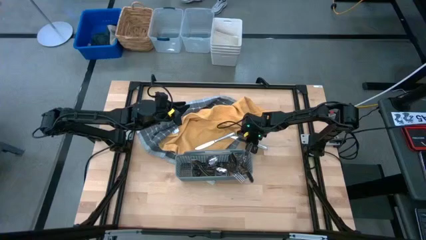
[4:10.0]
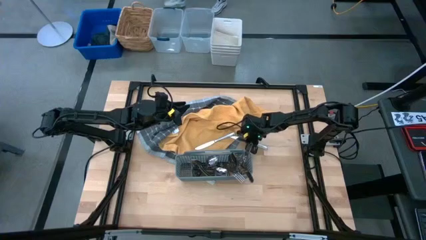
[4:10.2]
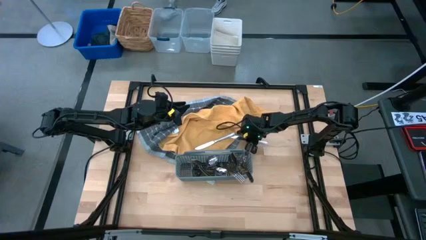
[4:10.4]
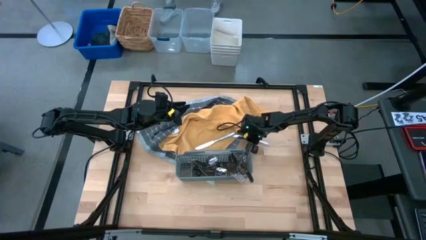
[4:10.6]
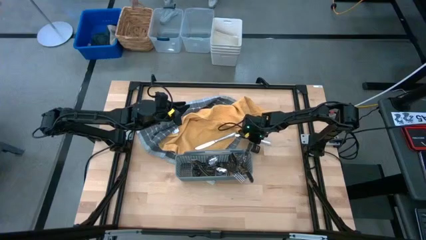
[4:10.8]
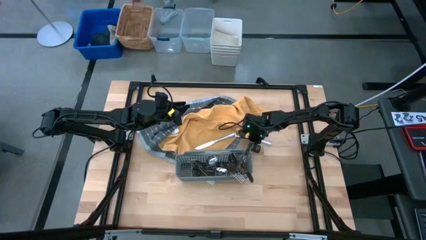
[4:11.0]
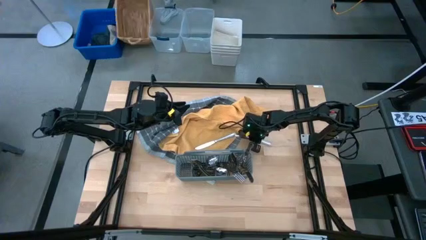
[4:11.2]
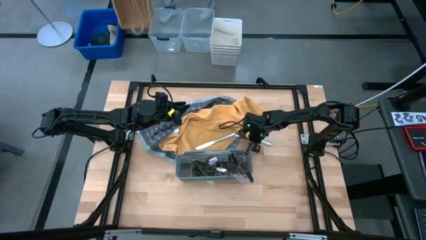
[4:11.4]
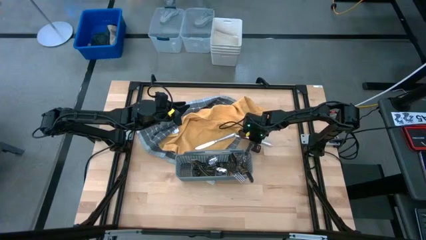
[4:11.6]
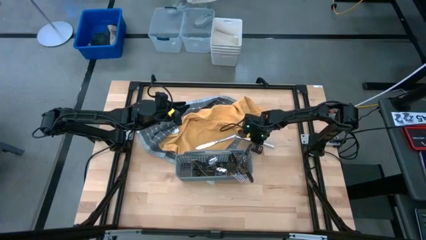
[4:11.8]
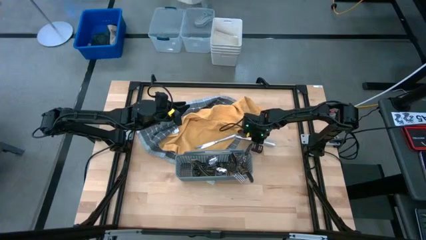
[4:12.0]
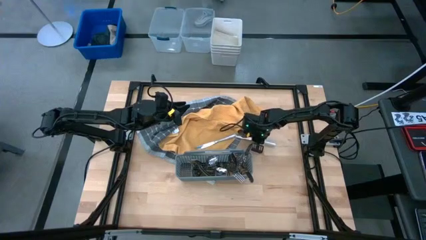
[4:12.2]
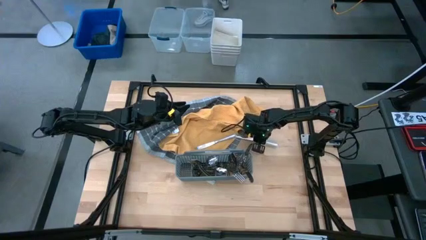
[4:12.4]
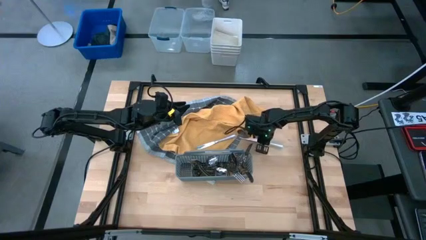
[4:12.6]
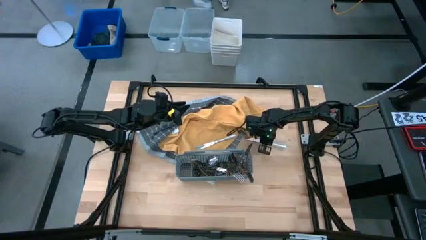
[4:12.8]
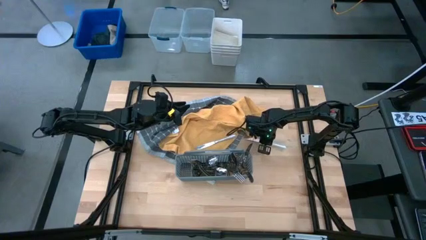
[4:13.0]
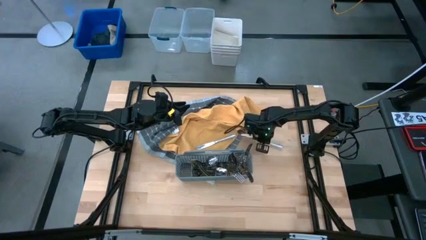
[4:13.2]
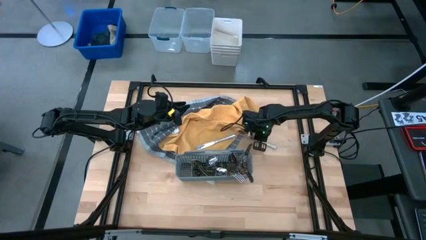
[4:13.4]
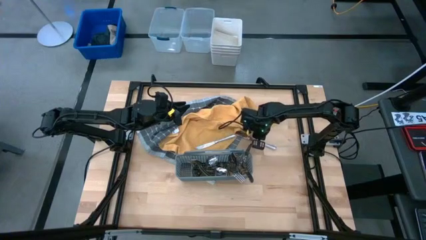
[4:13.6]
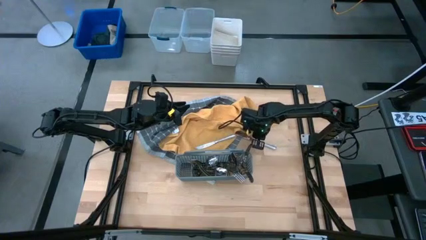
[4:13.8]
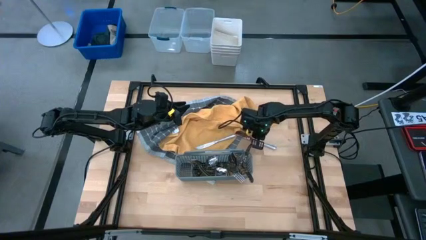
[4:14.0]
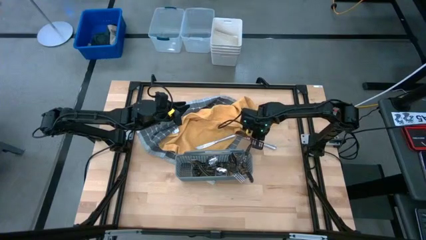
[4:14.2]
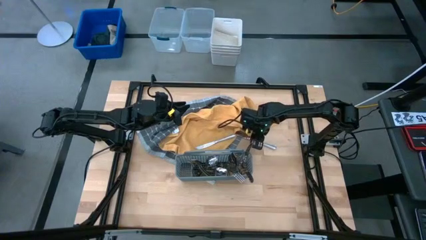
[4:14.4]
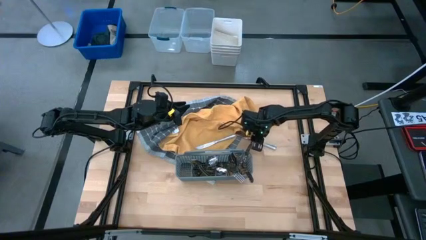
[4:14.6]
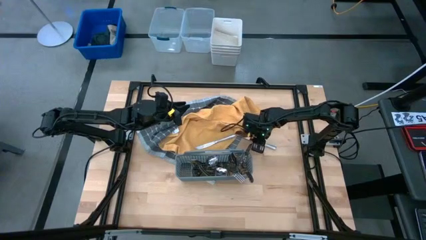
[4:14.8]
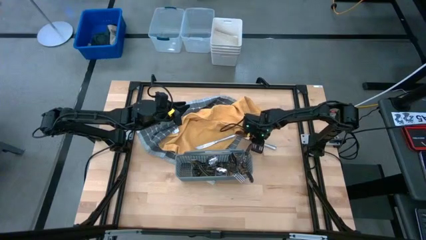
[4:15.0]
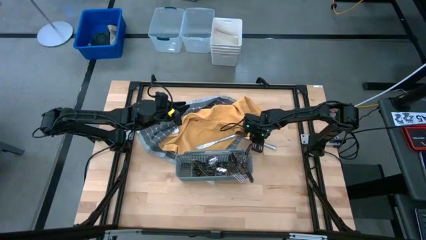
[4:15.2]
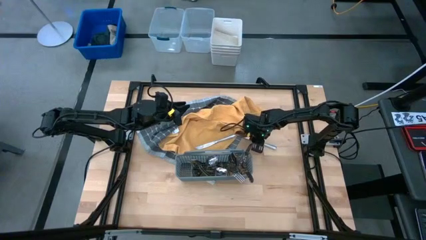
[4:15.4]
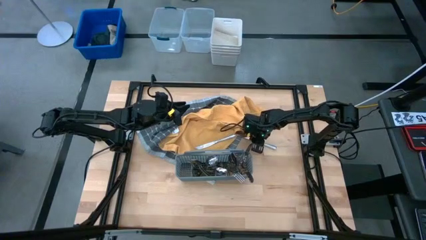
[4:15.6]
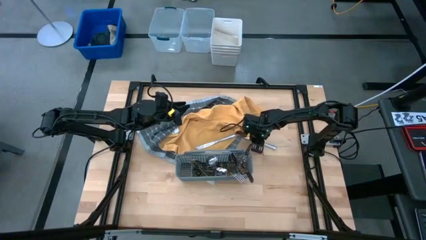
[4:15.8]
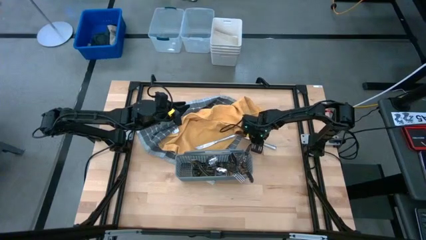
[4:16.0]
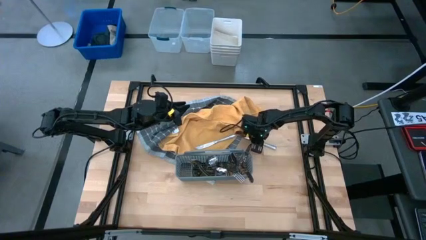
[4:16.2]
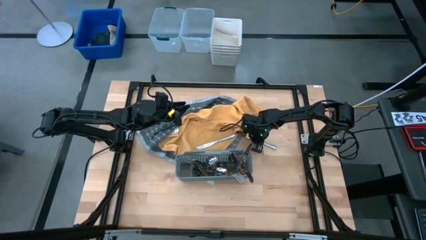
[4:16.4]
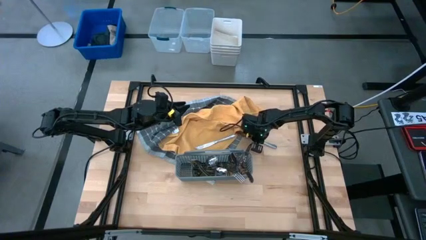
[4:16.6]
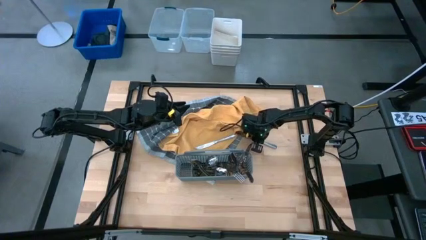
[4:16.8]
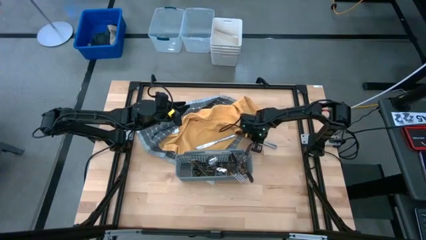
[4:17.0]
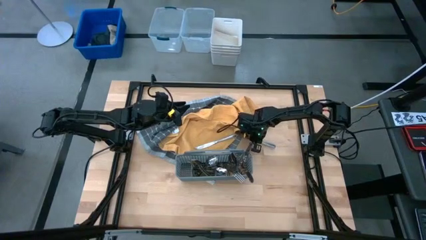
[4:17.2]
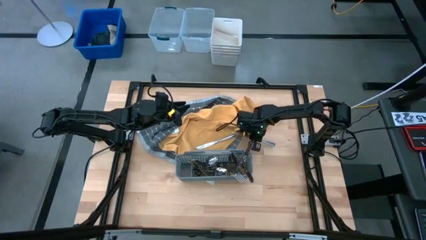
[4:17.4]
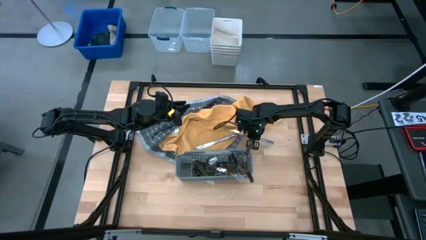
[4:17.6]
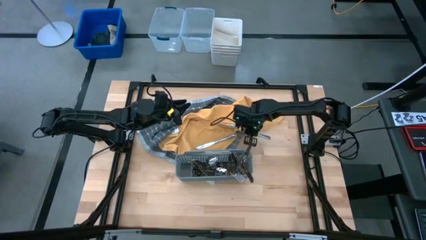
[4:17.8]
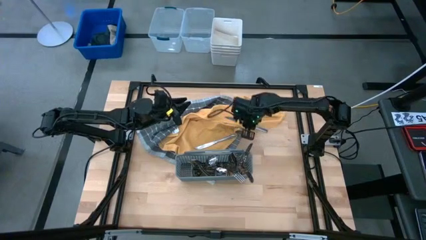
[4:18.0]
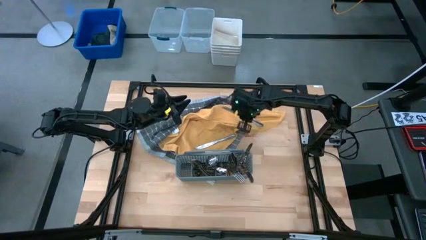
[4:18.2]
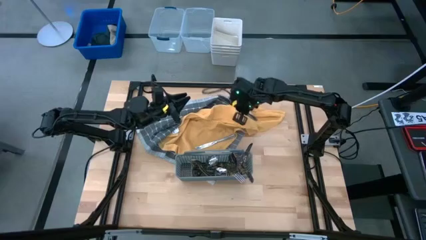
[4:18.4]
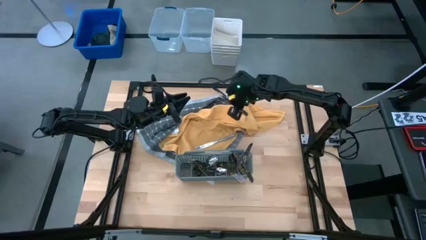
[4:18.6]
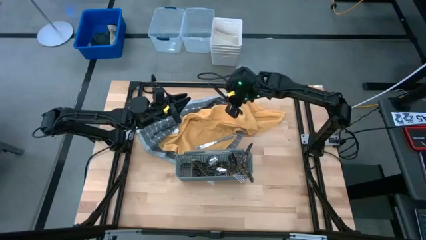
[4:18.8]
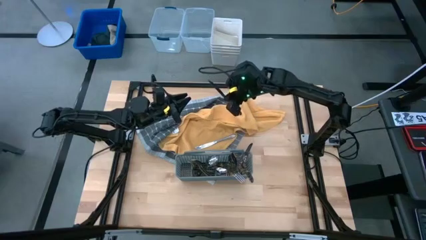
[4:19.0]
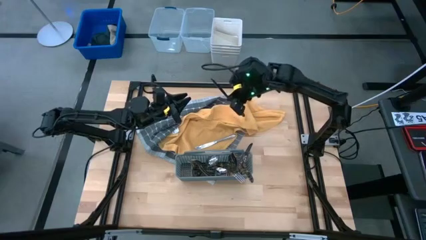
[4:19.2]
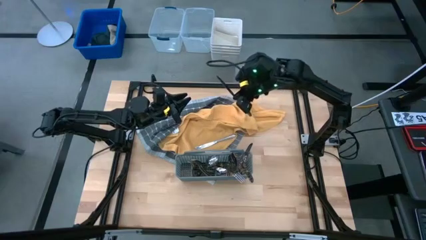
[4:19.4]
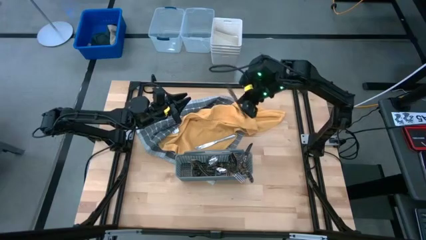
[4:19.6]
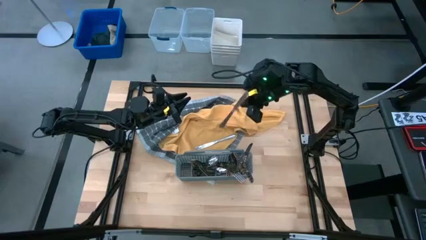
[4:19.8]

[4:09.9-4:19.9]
Task: Sort silverware
Put the silver knife into the gray silverware basket

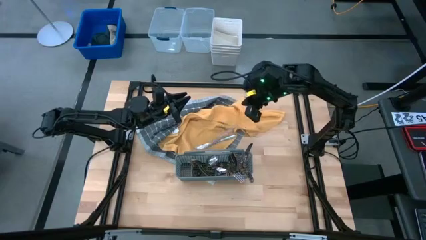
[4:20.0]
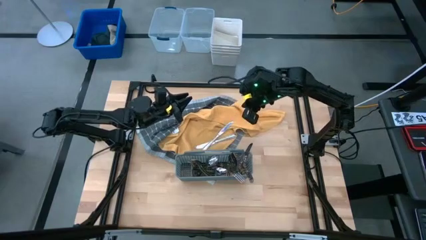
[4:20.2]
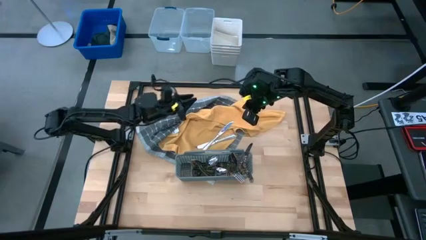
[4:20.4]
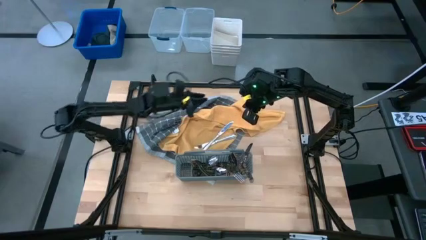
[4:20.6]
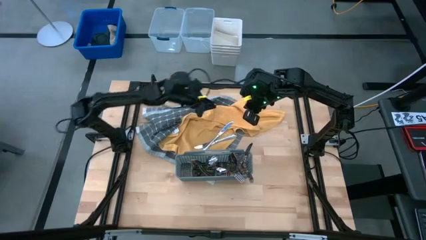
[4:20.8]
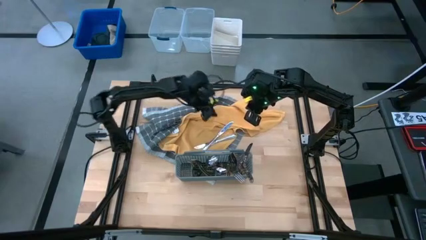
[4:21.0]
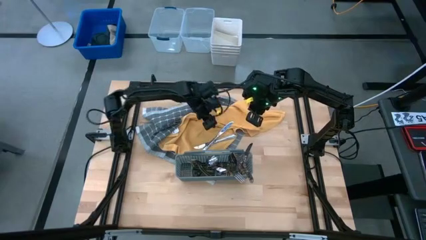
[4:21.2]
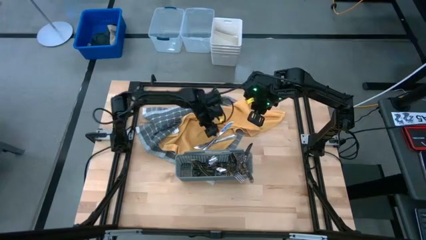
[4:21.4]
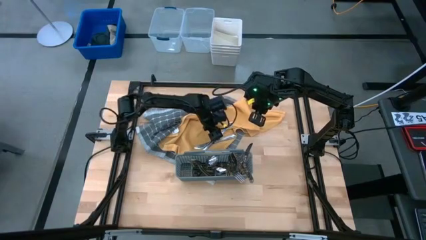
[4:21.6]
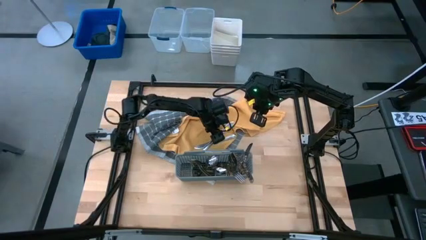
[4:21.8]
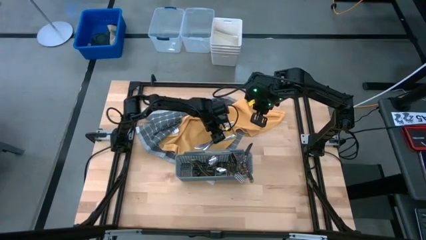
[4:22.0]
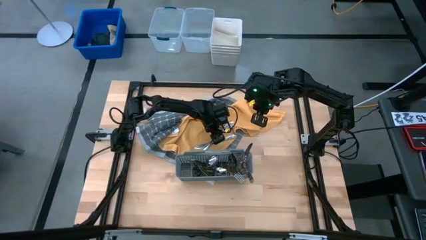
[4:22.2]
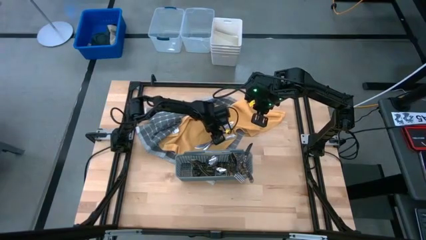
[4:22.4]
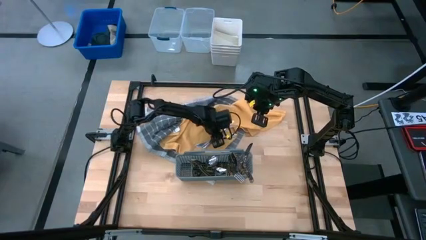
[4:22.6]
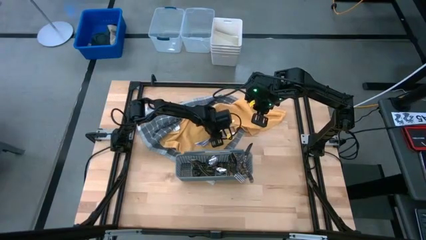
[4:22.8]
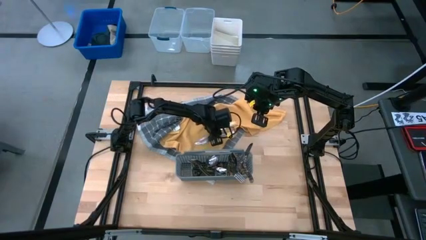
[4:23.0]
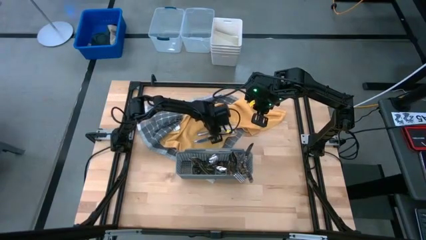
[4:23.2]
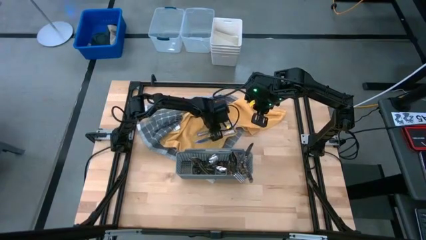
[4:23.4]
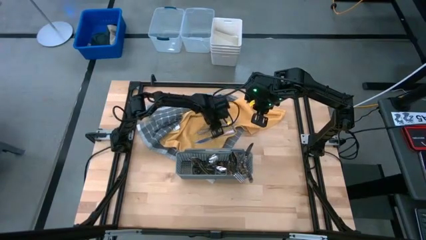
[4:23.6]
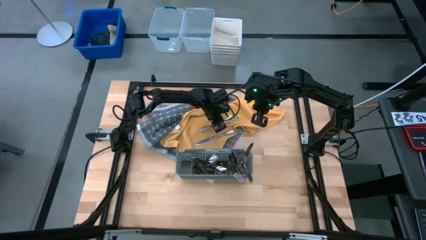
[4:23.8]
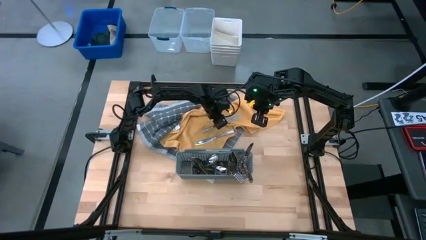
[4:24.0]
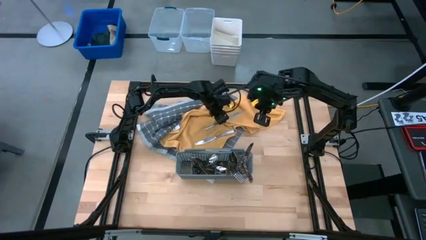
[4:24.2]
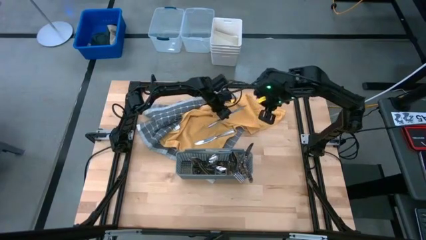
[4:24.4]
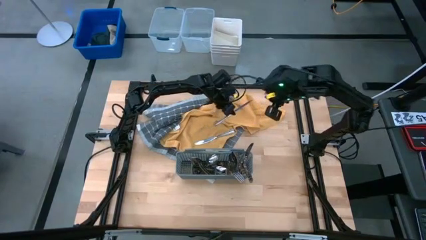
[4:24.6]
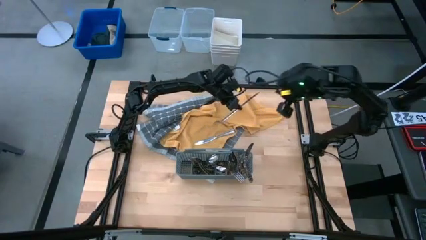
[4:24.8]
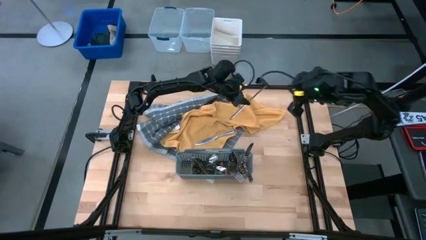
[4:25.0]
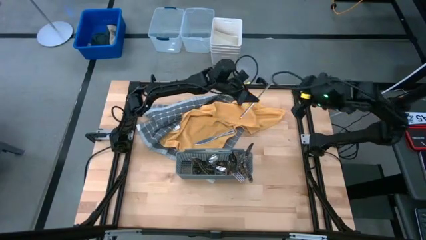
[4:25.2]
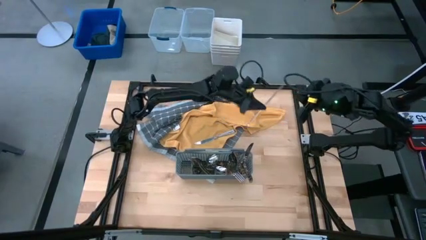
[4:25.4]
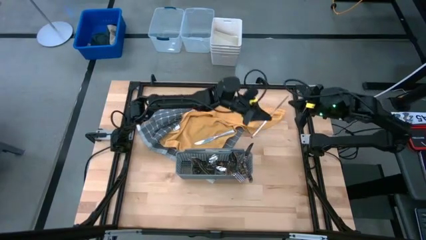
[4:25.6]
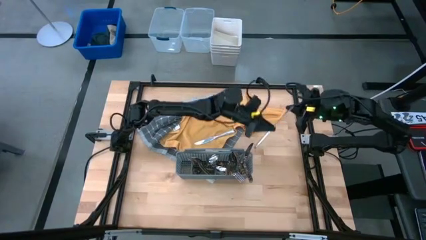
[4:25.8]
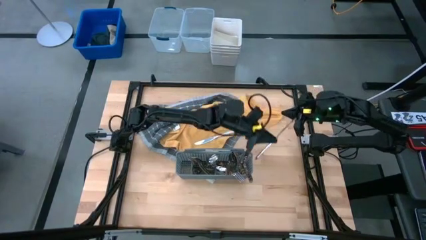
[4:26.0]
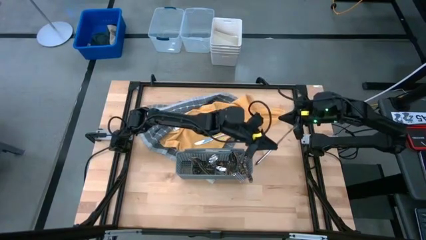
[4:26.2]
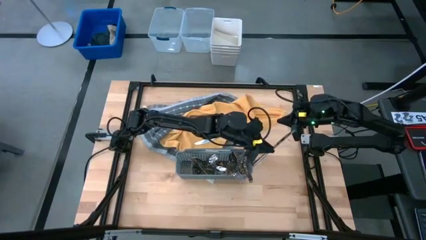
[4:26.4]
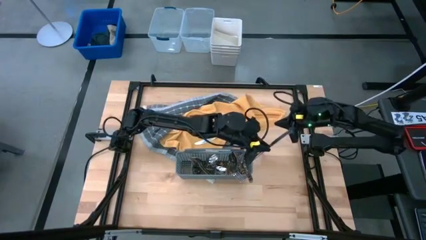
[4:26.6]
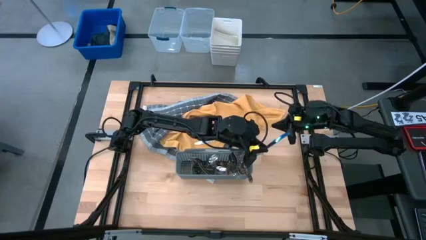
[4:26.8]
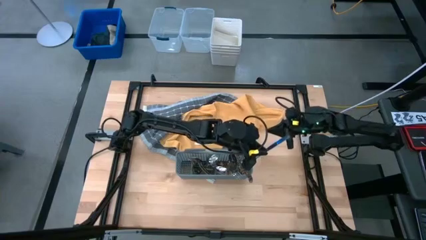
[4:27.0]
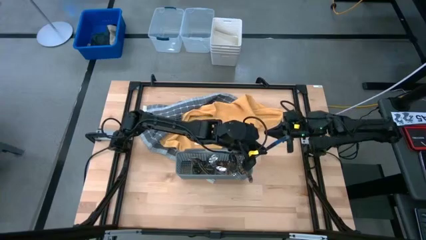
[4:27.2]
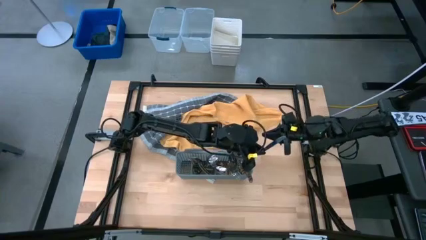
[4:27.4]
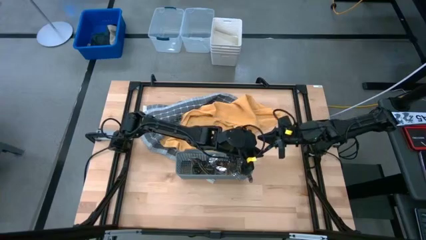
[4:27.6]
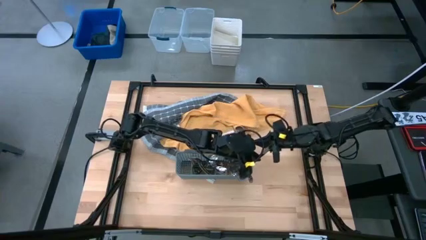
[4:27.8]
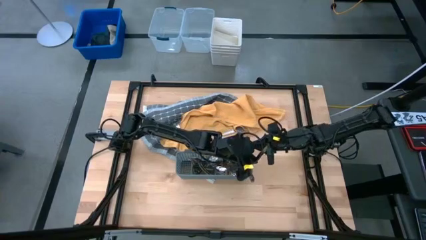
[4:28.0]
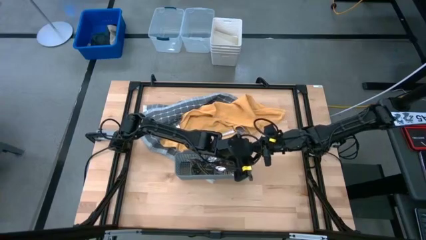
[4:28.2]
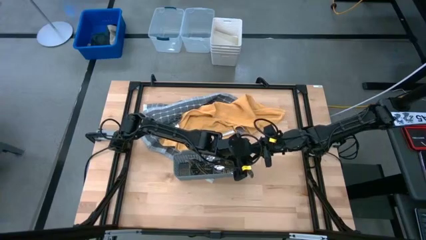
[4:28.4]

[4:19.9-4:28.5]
Put the silver knife into the gray silverware basket
